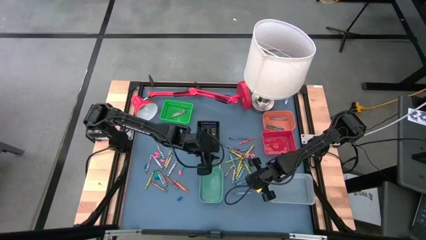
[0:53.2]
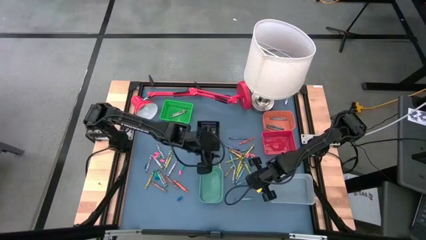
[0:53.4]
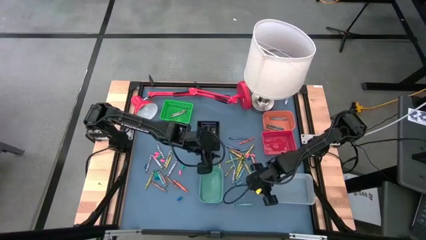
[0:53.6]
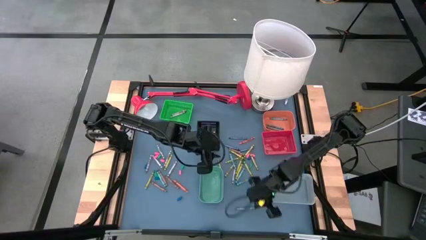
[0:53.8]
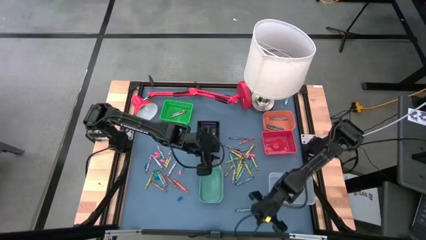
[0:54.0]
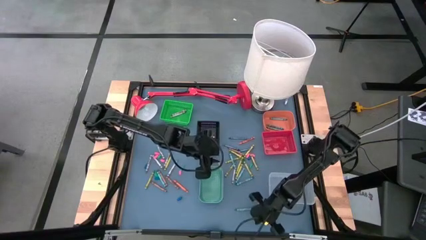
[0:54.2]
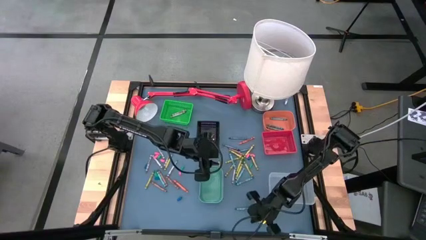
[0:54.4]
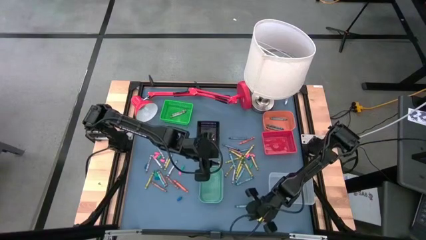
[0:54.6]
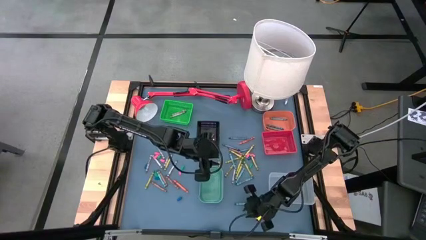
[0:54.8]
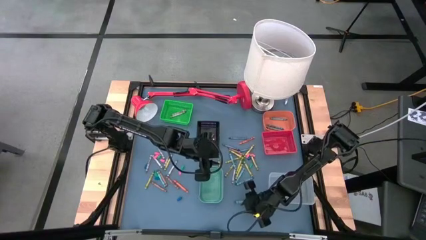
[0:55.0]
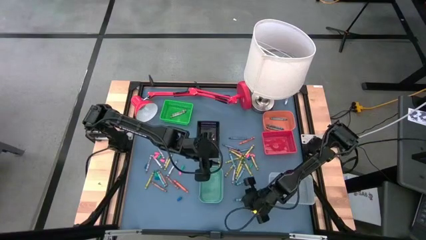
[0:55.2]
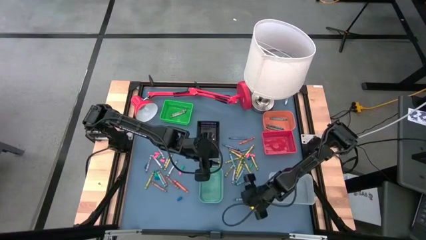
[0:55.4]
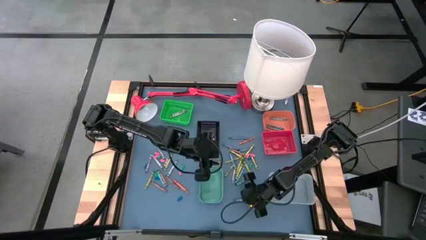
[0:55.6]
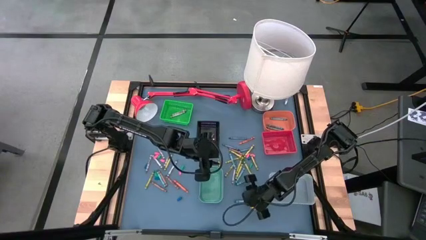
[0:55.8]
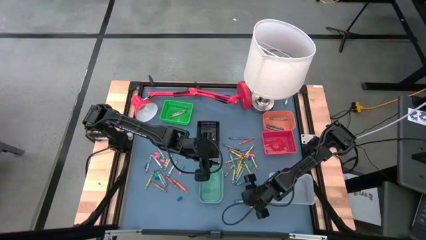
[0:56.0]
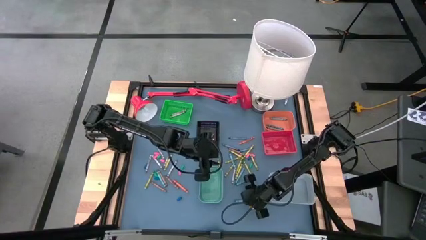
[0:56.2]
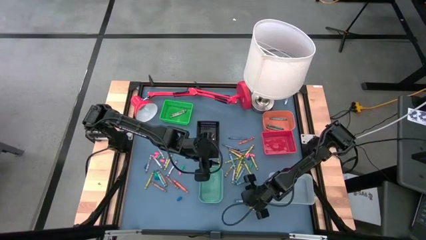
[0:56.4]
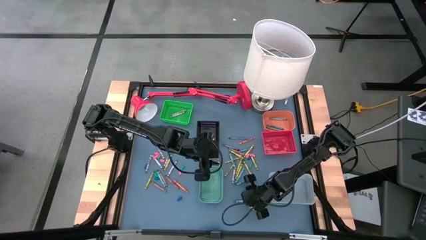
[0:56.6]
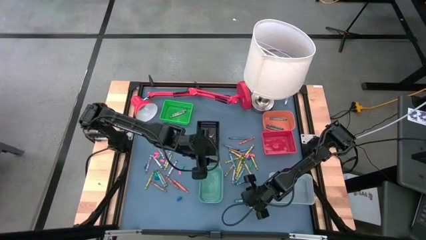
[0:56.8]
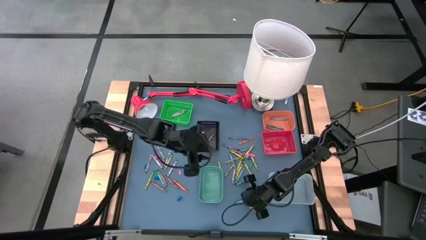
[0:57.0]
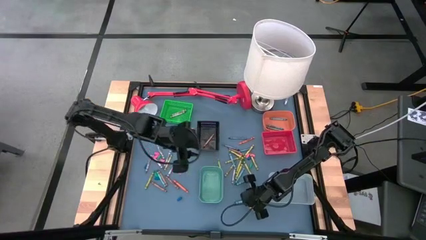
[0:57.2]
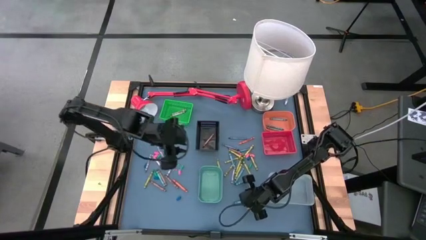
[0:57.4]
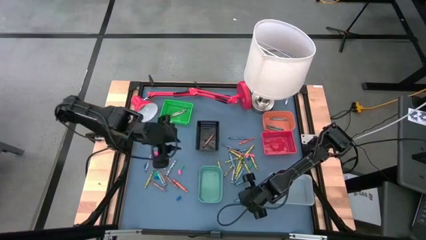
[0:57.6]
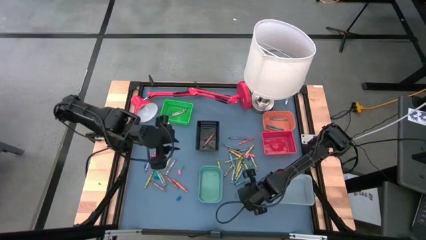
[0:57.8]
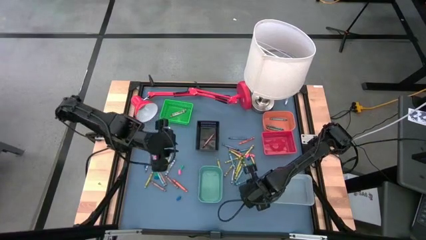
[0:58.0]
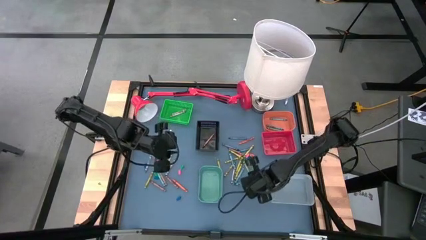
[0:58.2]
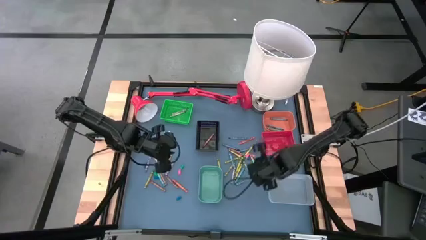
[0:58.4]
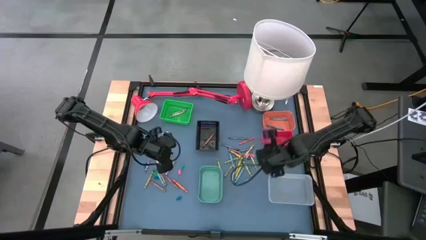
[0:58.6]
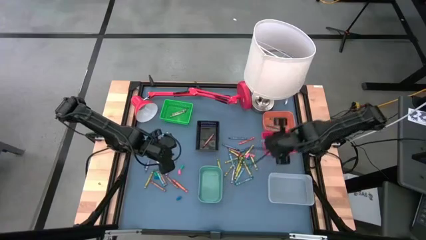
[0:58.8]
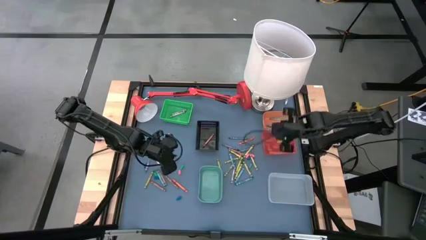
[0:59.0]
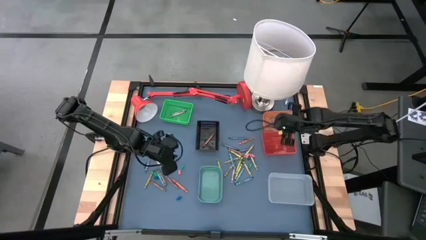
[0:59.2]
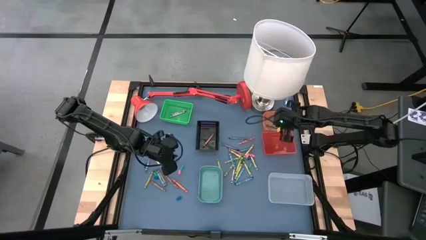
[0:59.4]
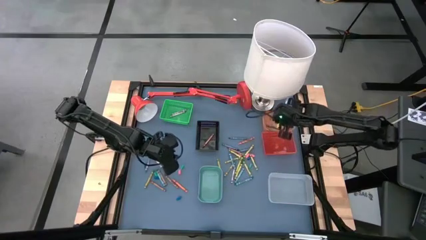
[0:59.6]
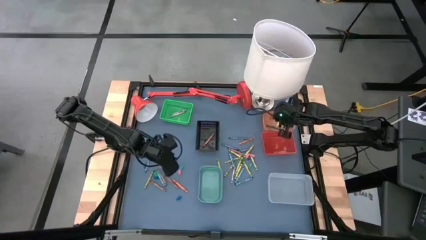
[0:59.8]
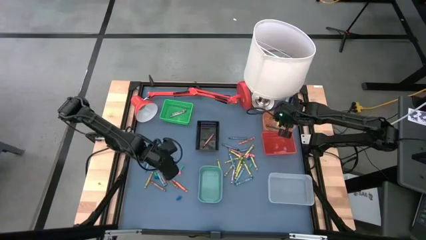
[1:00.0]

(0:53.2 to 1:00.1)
Task: Sort crayons
Put the blue green crayon into the orange bin

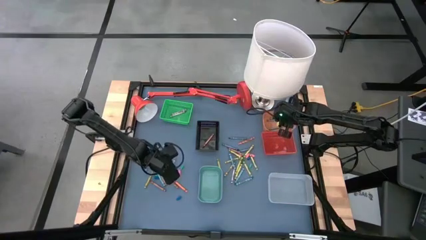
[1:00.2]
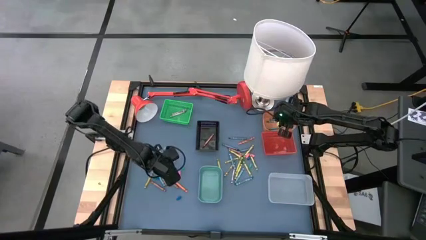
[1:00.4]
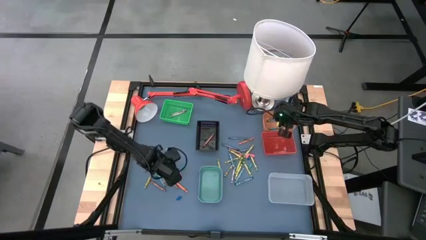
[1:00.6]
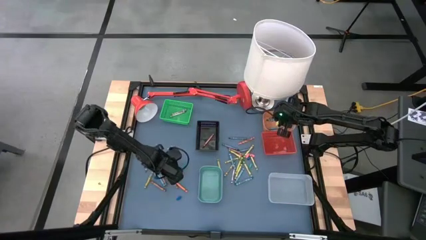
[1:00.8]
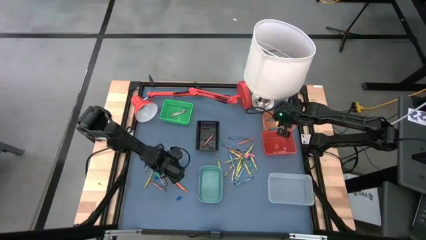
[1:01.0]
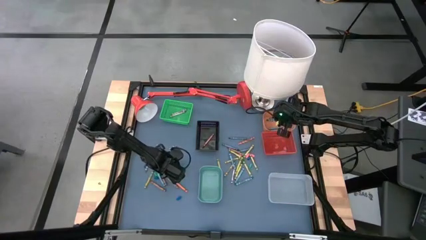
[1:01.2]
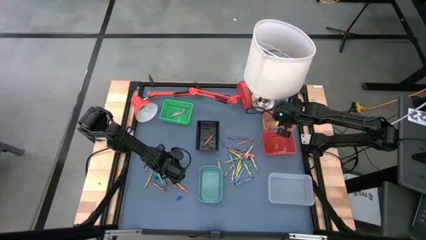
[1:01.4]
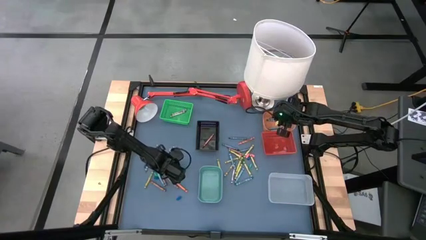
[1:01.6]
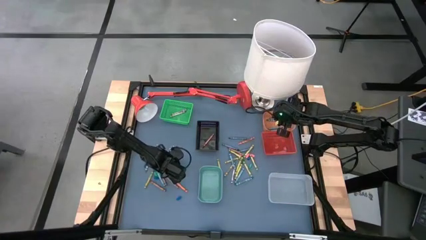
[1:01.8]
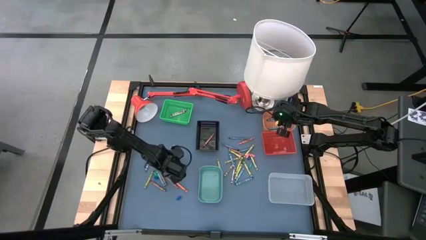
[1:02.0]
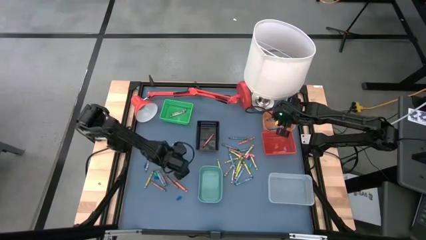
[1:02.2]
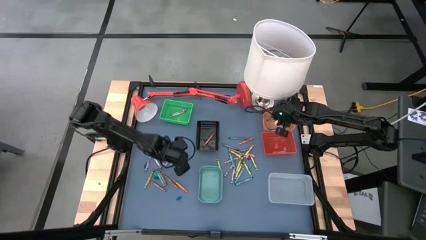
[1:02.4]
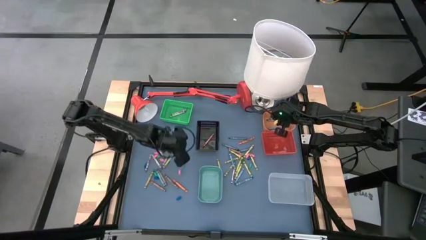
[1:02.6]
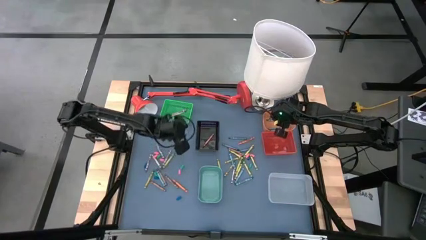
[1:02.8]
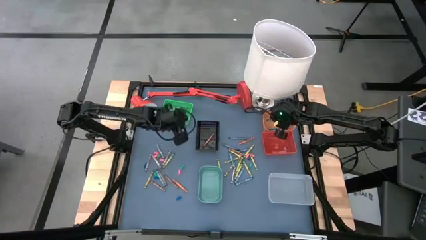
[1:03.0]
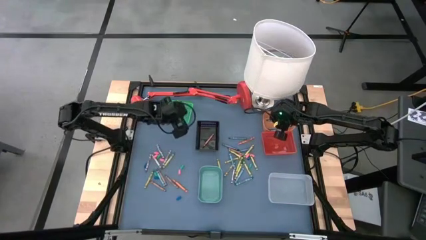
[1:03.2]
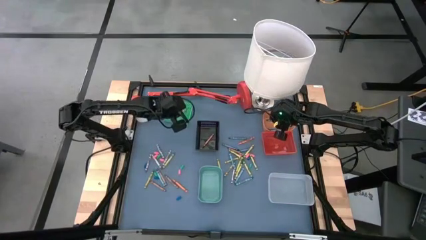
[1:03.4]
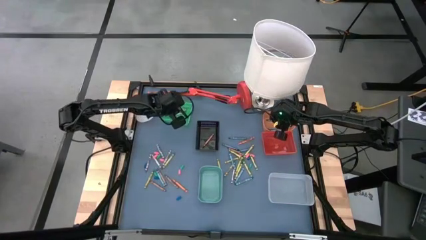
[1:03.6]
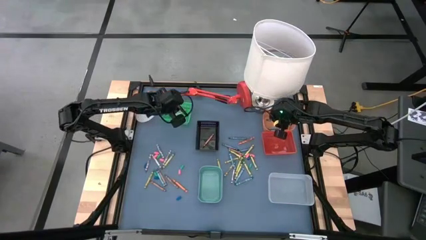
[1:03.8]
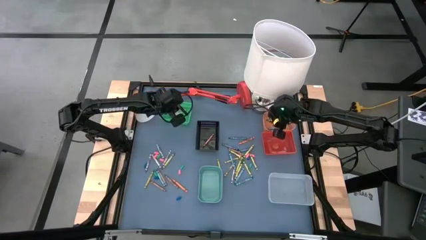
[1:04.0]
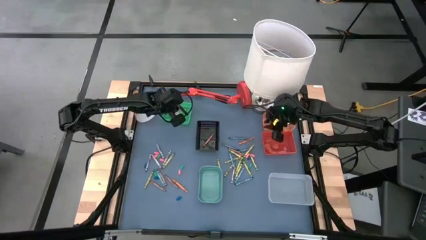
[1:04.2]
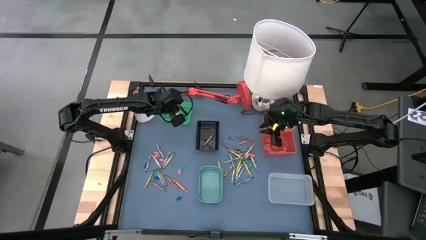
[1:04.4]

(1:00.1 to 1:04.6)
Put the gray crayon into the green bin

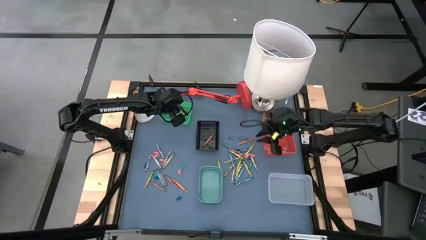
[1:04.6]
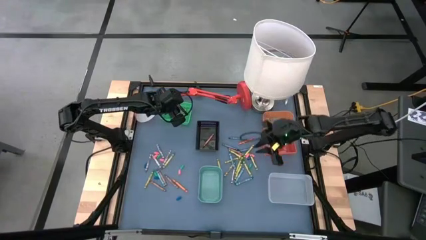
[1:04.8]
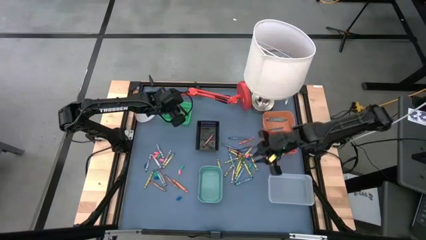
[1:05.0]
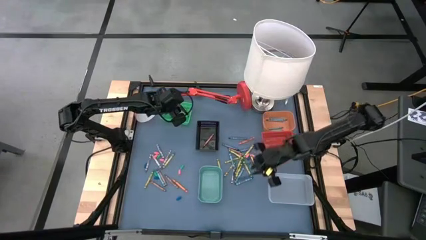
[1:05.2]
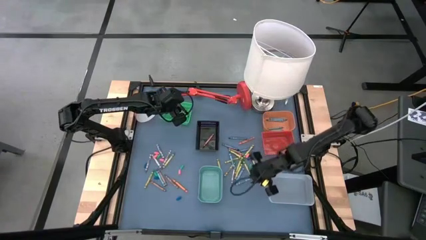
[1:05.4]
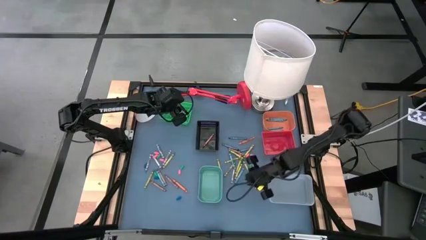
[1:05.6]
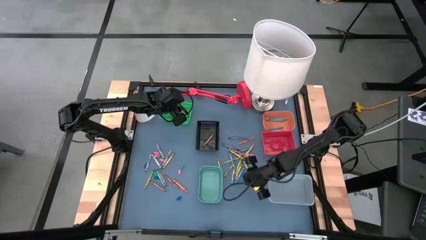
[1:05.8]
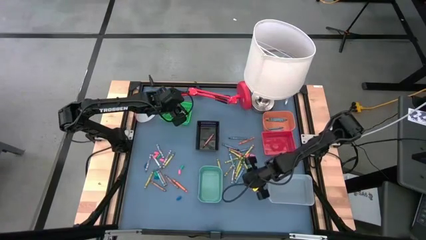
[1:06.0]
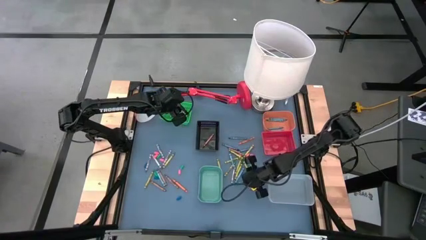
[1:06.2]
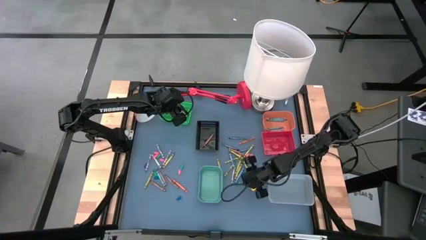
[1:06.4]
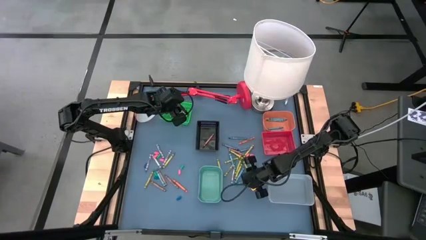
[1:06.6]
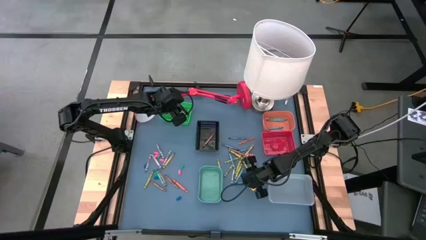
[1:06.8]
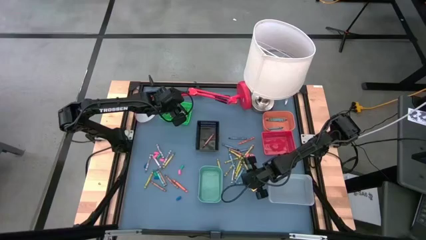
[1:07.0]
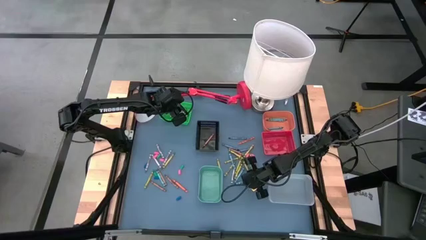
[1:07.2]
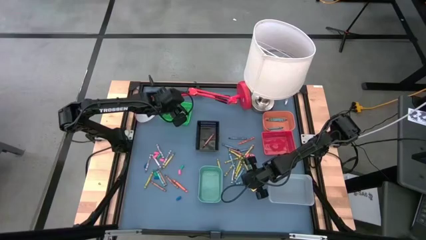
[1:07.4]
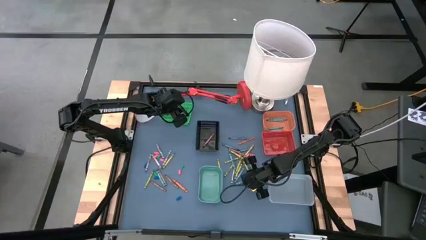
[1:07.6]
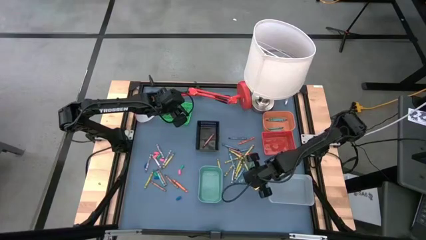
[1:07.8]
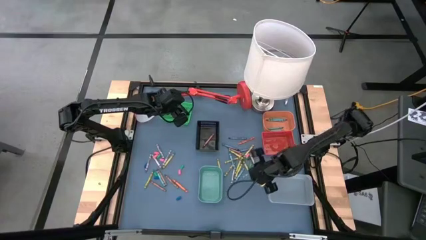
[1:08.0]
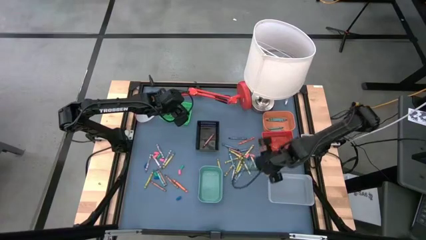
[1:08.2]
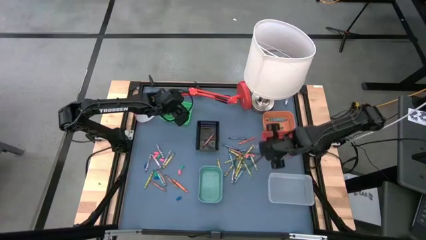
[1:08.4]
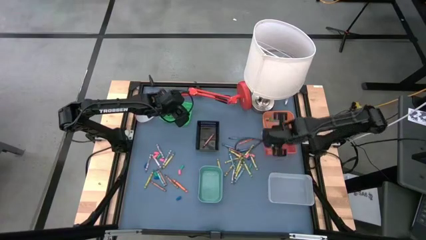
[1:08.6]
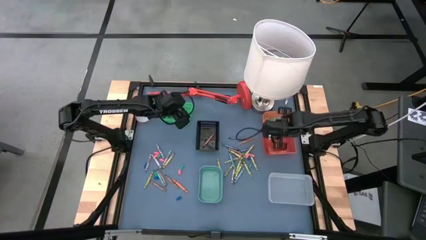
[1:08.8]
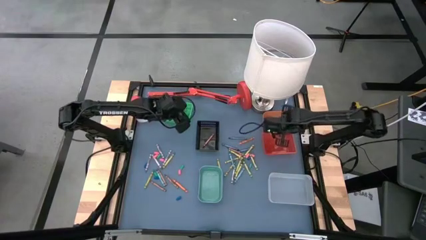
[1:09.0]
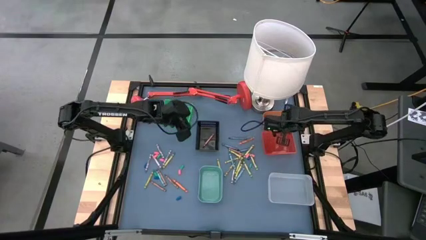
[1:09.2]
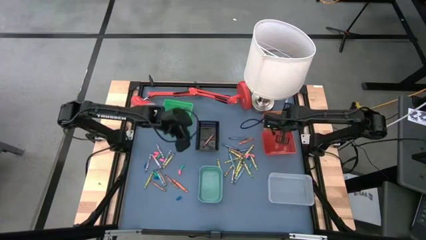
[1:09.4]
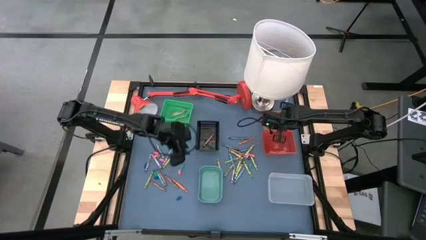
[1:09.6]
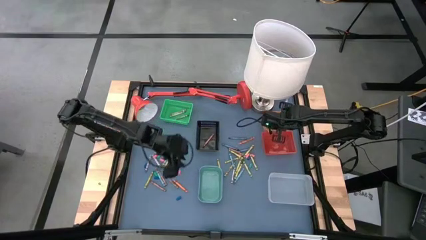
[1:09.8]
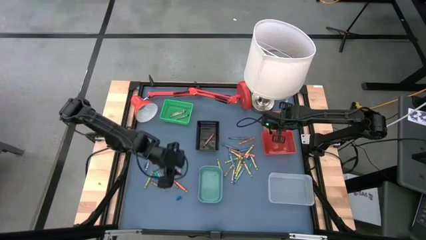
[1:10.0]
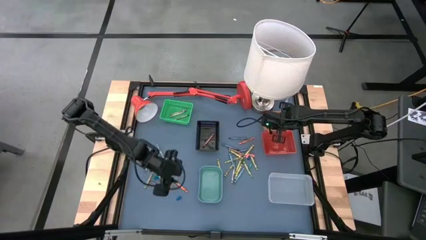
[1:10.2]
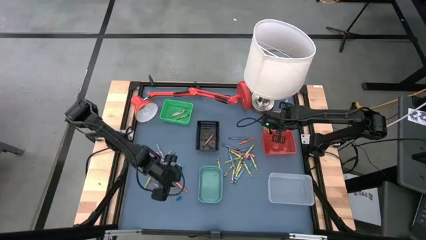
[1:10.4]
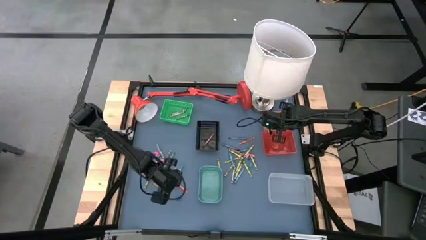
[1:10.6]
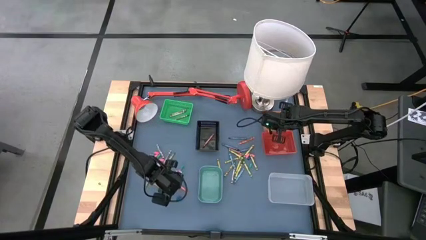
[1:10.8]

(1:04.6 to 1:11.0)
Put the blue green crayon into the orange bin
